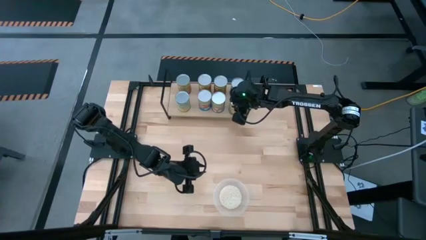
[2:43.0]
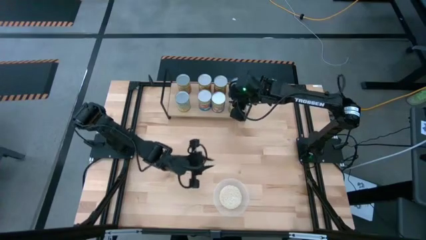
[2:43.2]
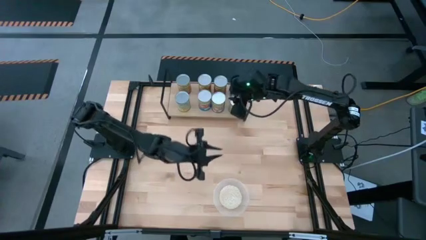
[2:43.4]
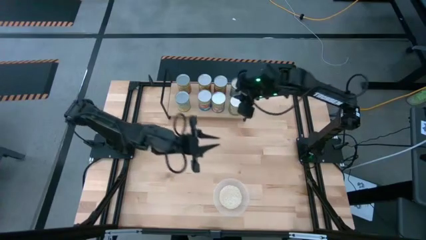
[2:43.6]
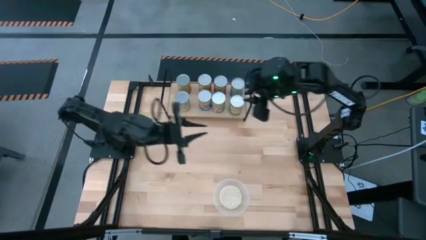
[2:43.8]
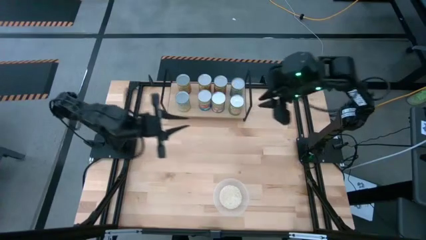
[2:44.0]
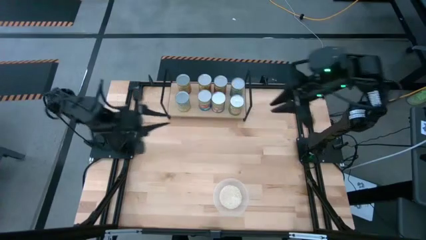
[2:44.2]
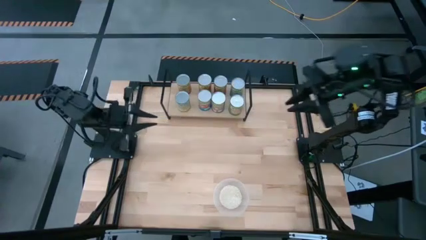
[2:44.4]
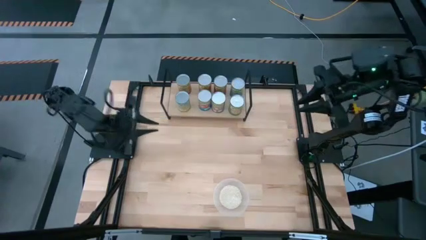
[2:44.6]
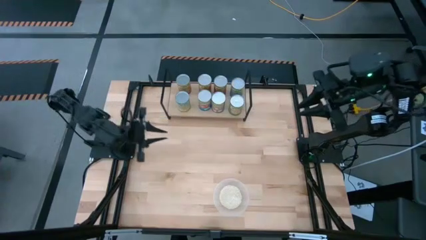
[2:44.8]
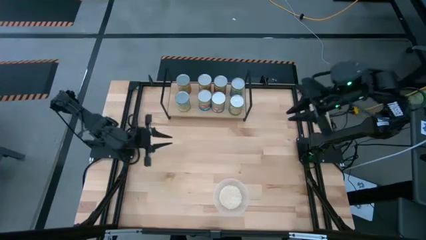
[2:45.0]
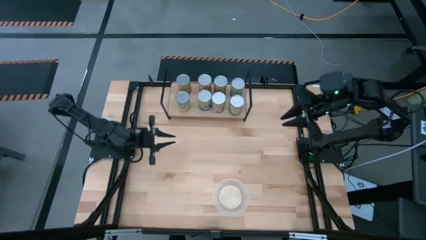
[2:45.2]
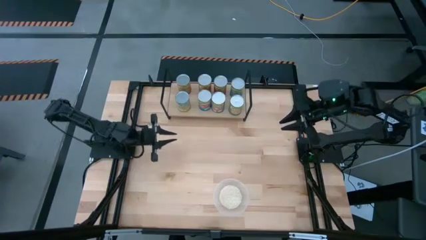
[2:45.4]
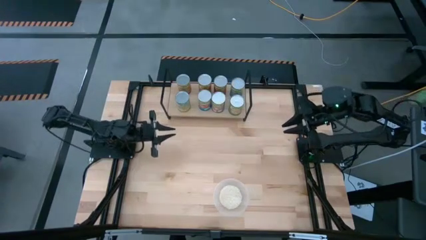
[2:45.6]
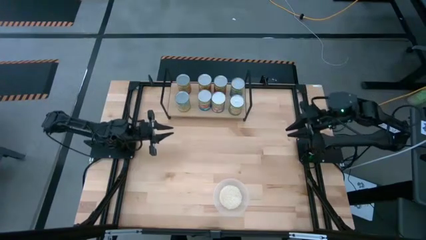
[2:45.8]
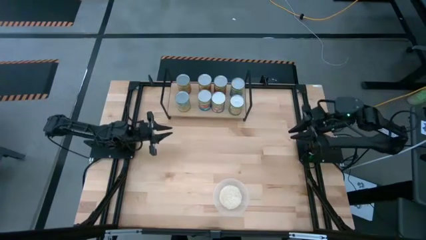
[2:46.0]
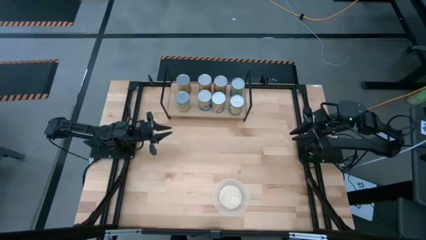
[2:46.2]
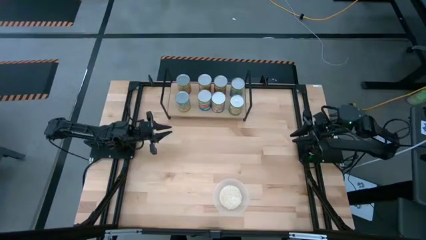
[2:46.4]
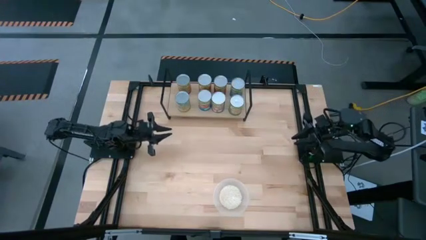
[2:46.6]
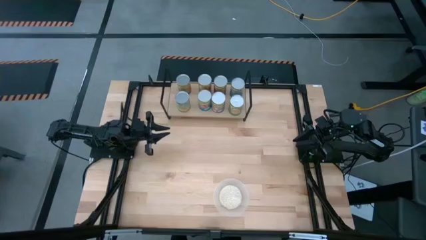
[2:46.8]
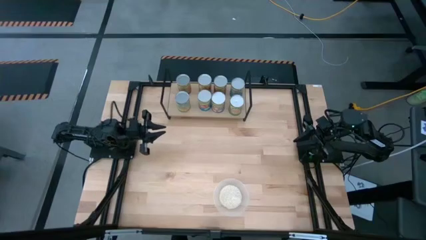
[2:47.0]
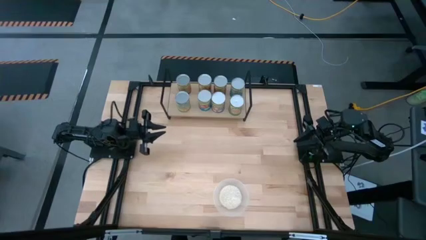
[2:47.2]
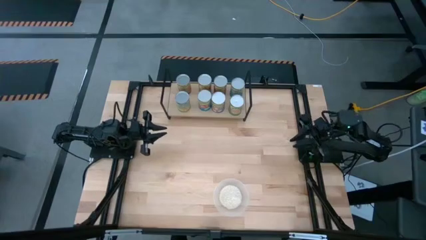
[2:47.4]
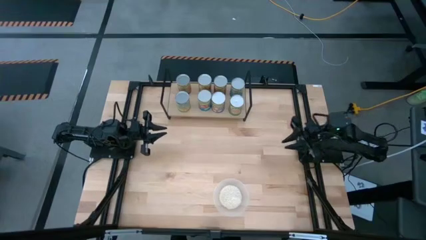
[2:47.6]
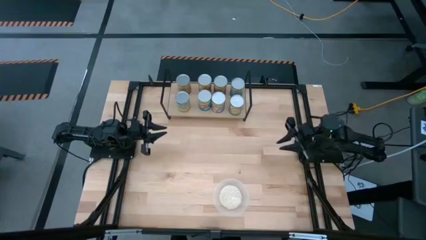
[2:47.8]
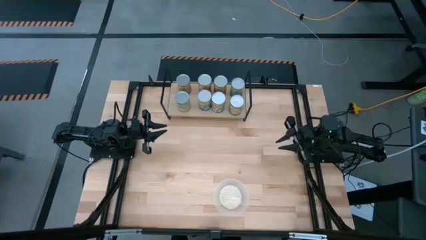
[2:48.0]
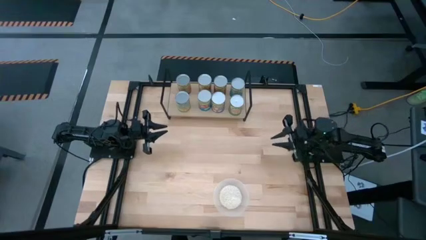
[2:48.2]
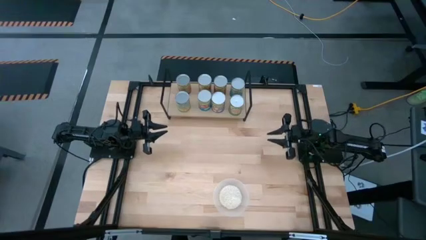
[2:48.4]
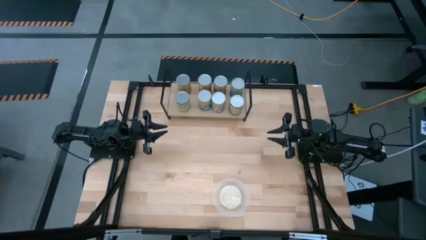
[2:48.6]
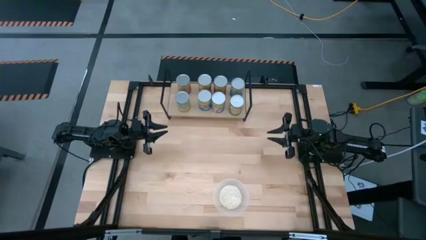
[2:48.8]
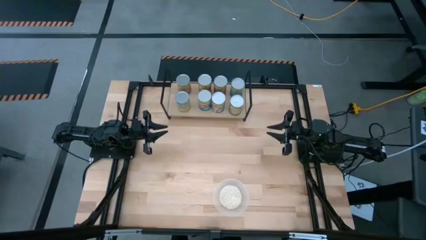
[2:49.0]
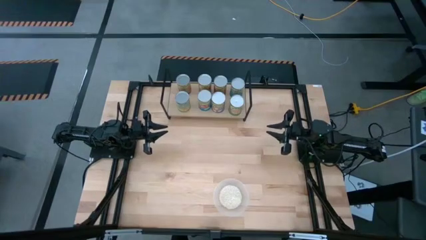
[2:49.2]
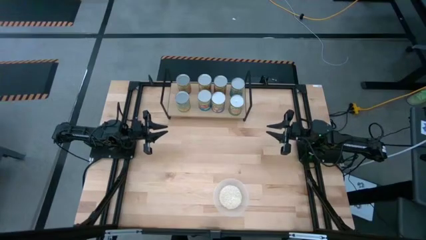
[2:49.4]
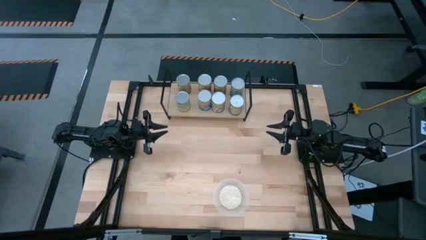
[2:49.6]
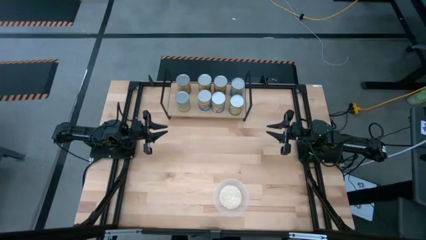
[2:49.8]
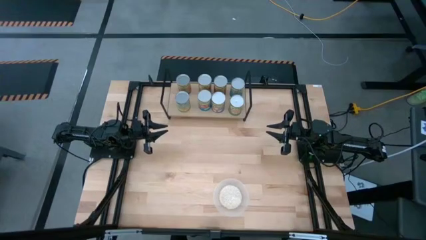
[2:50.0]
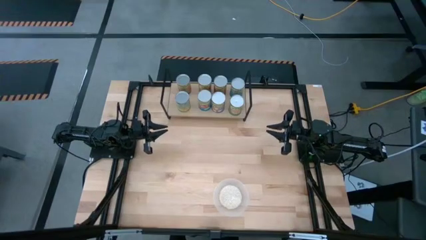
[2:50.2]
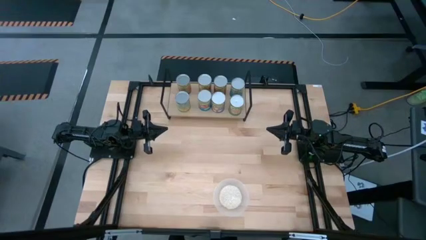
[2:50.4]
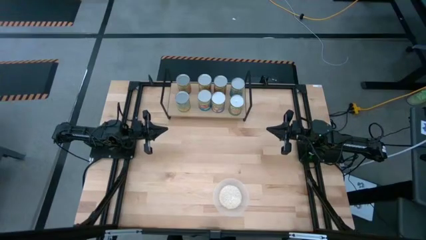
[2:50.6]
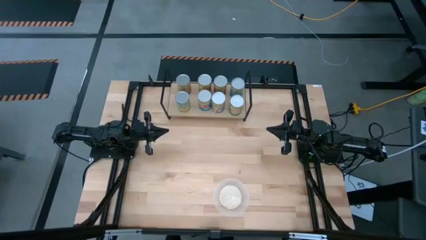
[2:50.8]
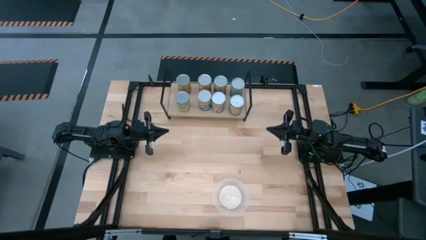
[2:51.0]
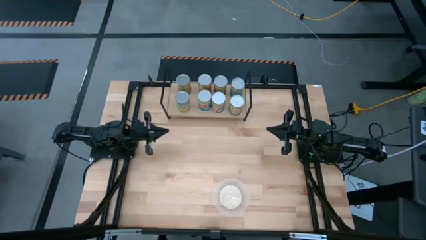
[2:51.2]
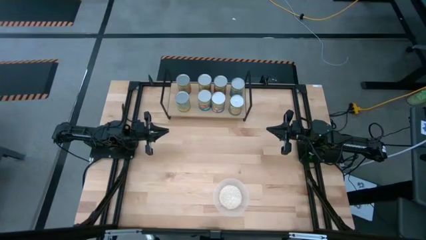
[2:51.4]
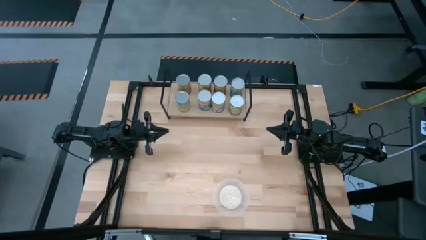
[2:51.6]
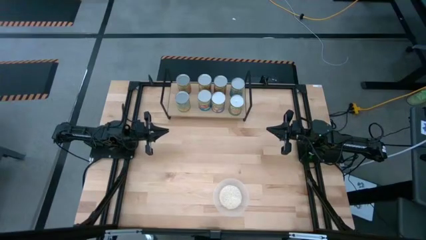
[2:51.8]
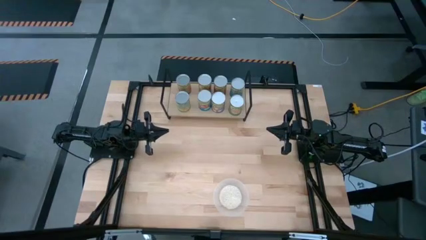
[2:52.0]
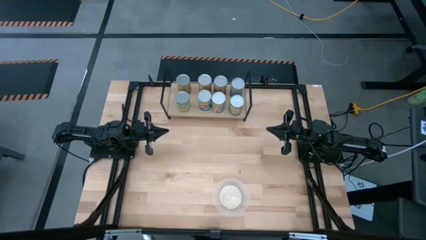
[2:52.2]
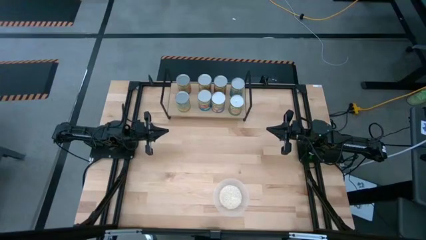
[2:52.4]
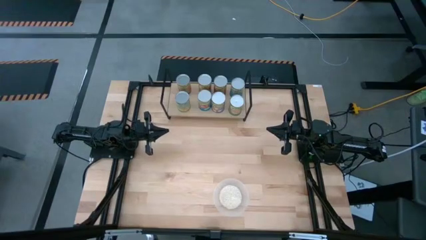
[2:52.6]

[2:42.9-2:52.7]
Task: Pick and place cans onto a shelf
Return to Home Position

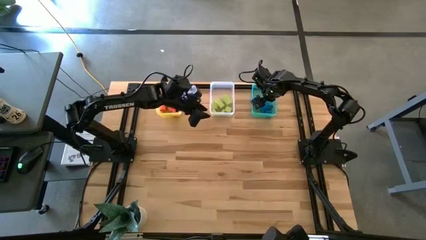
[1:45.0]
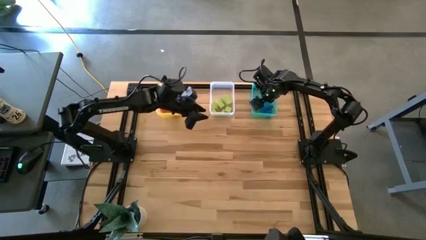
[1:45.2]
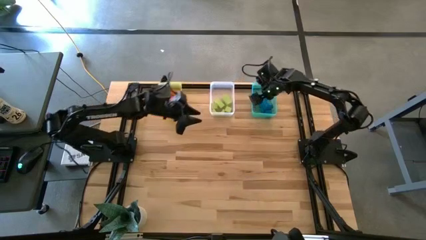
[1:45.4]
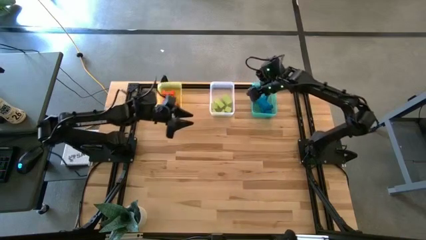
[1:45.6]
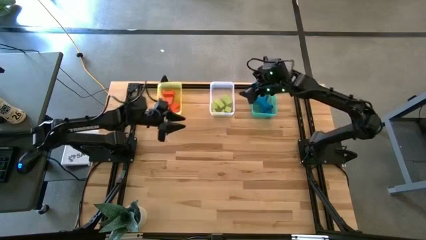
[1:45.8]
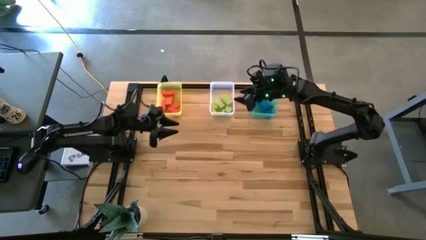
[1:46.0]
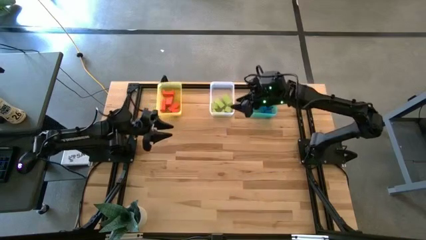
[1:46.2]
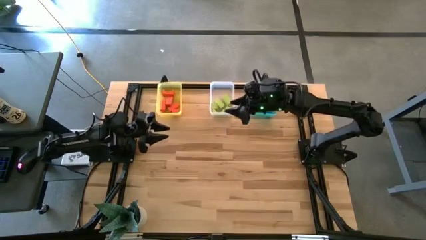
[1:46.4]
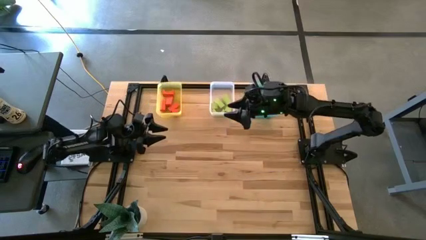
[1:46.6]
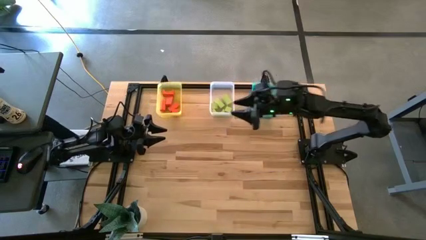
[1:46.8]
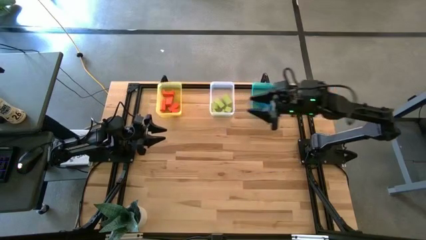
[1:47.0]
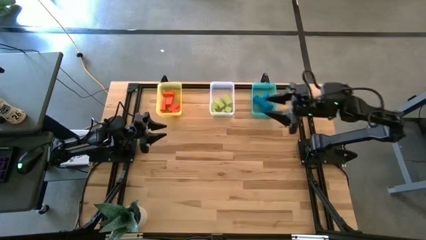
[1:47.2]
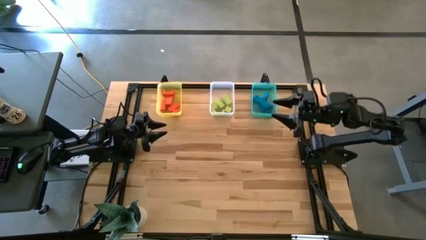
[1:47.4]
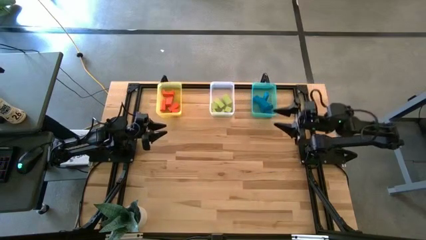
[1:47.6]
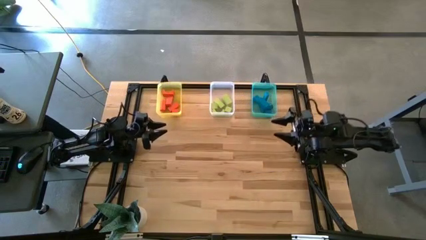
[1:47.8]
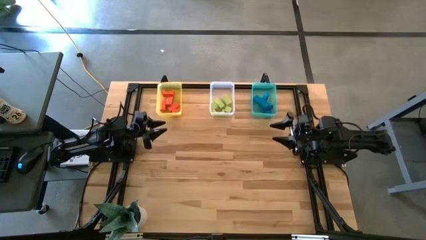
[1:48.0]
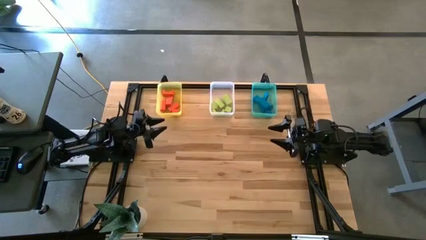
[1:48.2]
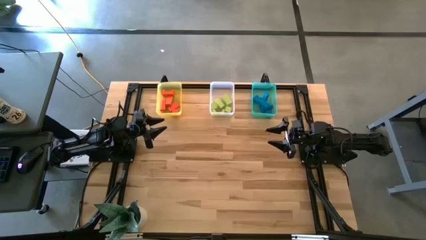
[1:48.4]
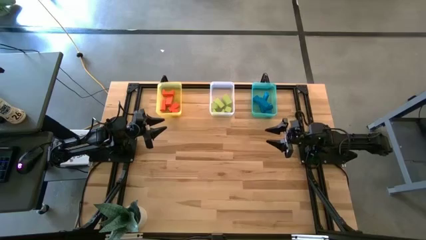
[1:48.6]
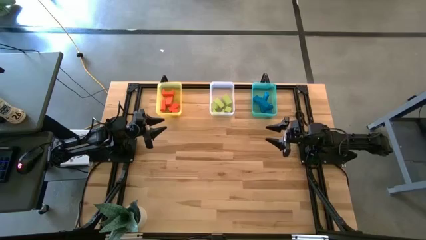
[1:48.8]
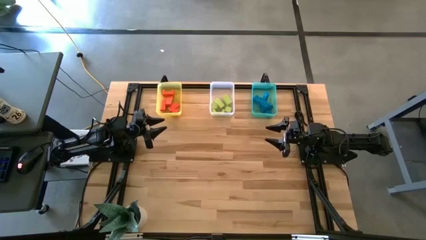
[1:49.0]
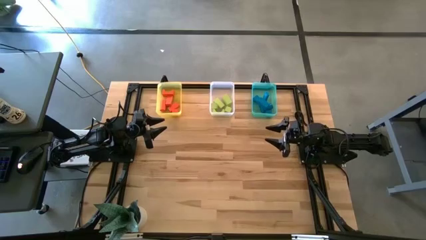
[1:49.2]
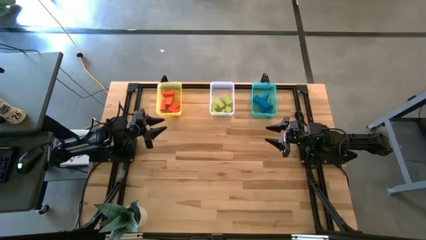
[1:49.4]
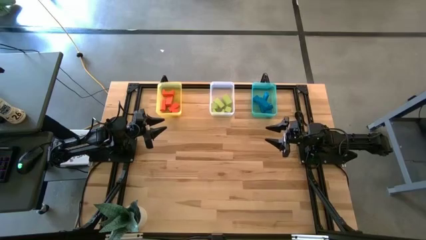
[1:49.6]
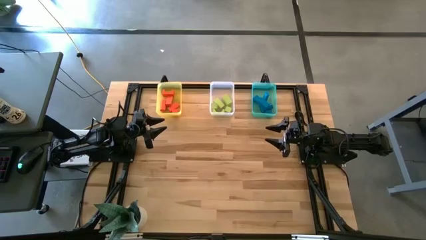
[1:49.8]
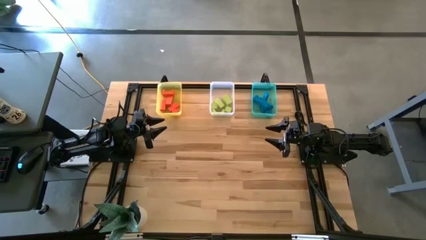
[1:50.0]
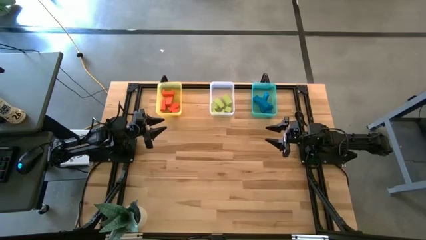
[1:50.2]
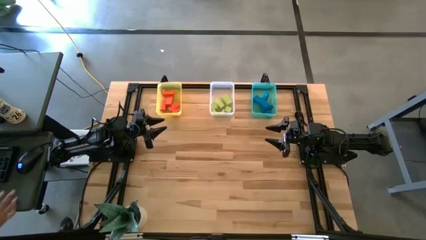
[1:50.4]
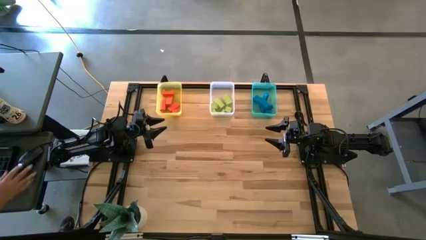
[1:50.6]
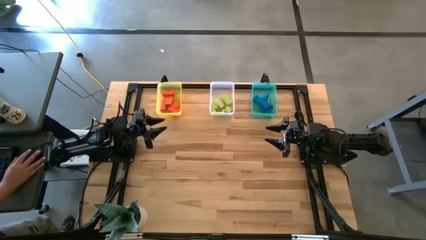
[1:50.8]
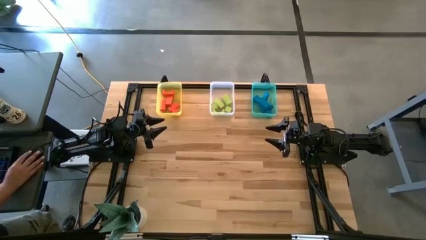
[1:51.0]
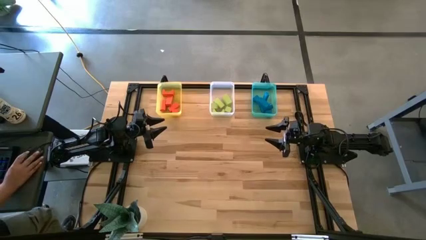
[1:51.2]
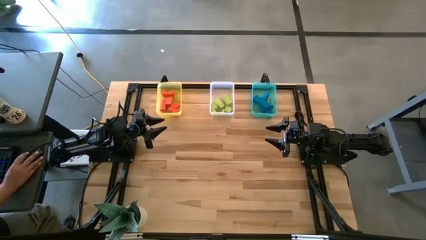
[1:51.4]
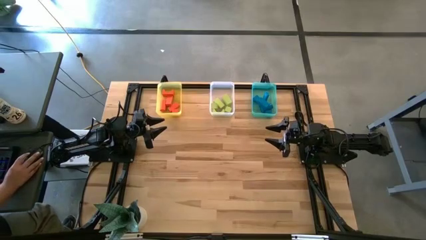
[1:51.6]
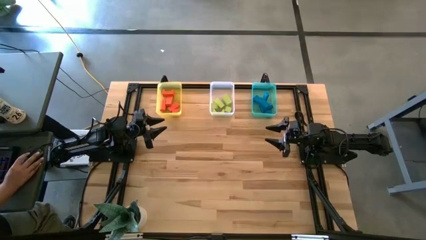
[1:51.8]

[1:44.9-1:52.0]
Task: Sort & place blocks by color
Return to Home Position
